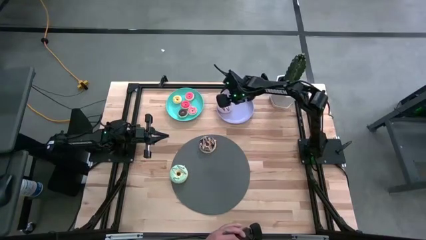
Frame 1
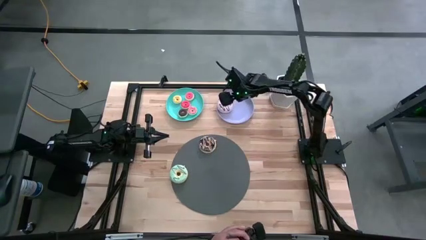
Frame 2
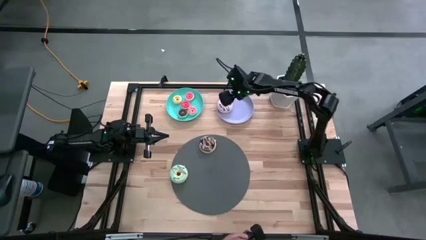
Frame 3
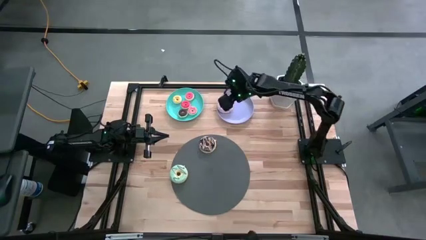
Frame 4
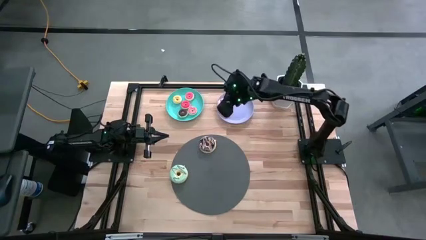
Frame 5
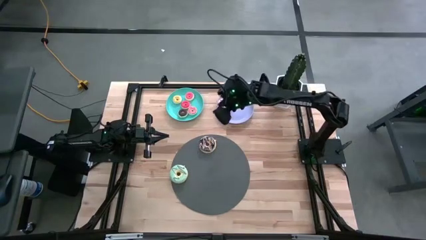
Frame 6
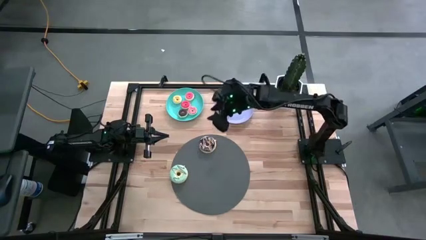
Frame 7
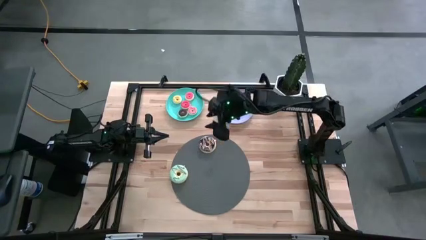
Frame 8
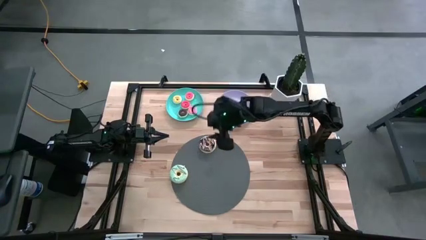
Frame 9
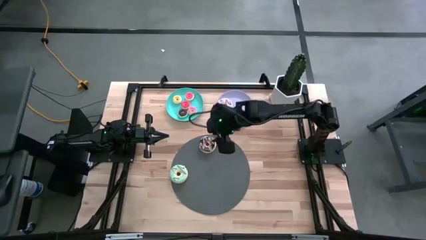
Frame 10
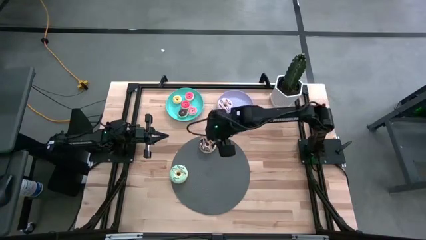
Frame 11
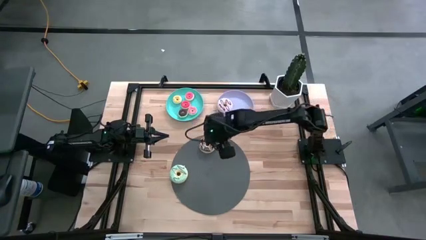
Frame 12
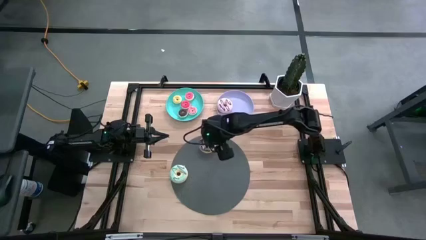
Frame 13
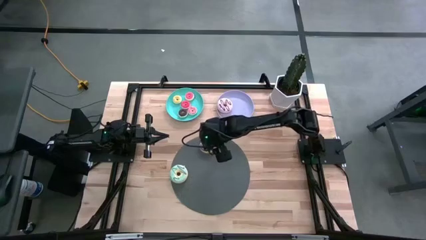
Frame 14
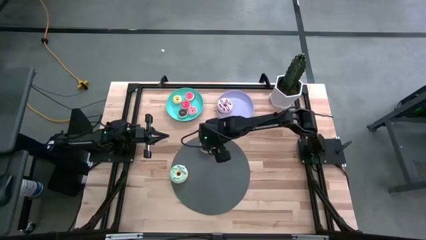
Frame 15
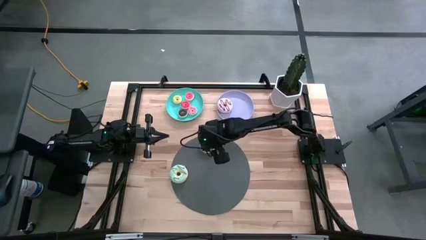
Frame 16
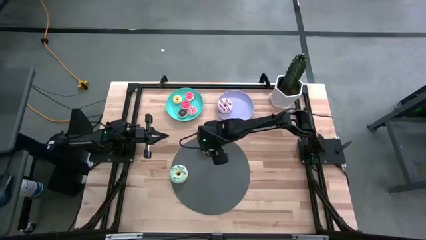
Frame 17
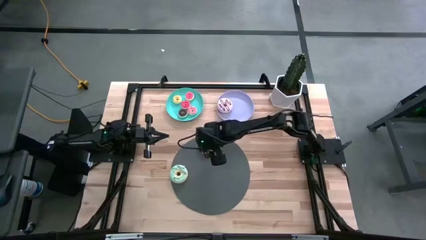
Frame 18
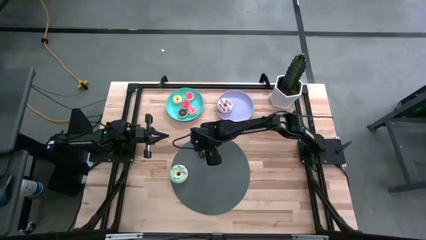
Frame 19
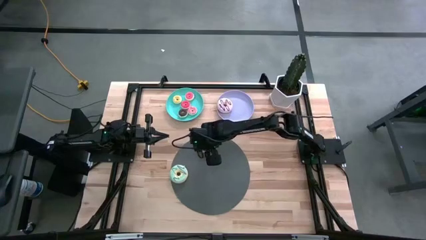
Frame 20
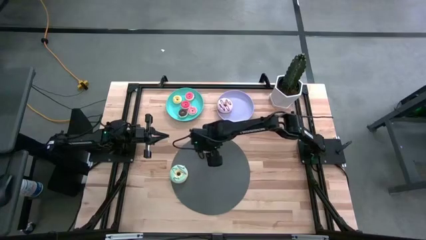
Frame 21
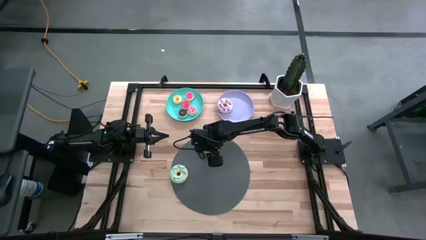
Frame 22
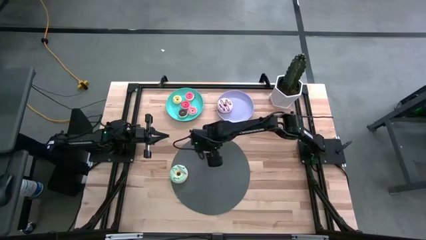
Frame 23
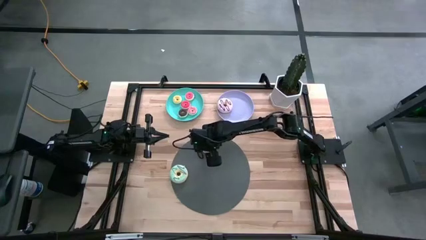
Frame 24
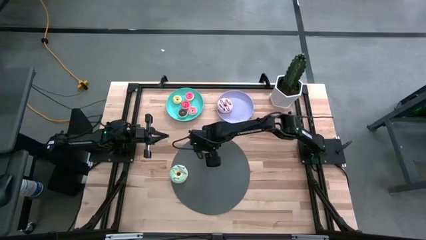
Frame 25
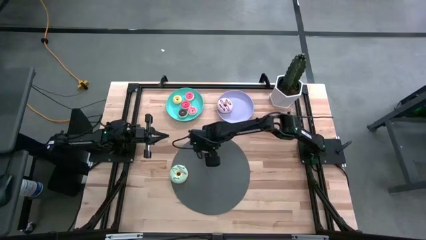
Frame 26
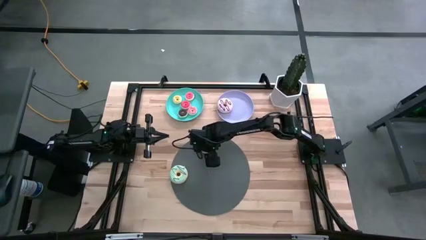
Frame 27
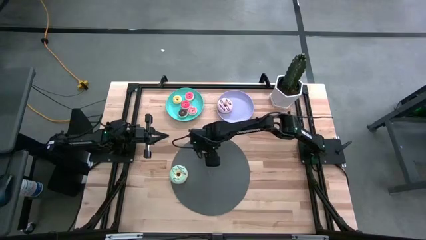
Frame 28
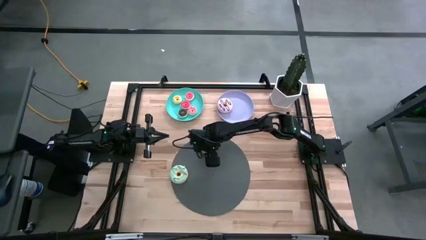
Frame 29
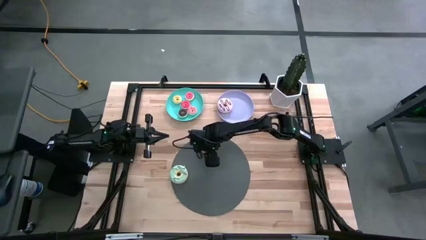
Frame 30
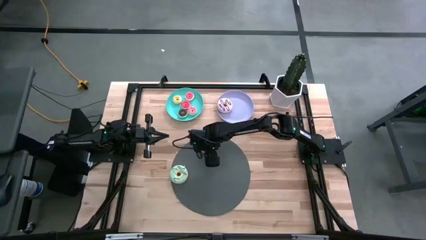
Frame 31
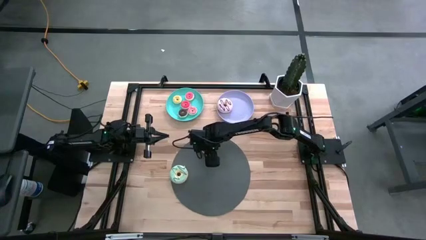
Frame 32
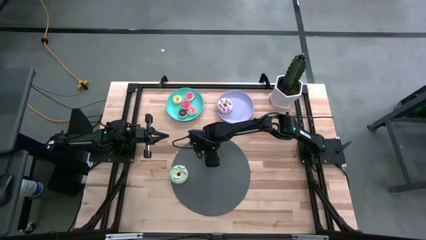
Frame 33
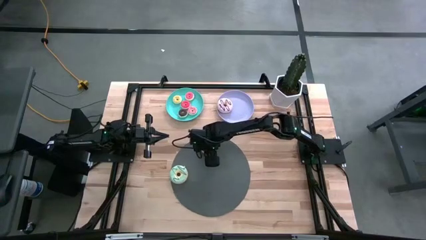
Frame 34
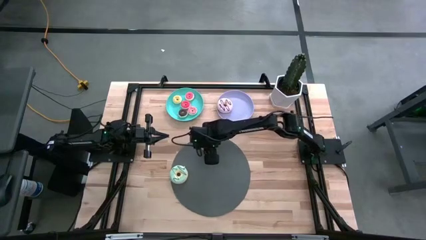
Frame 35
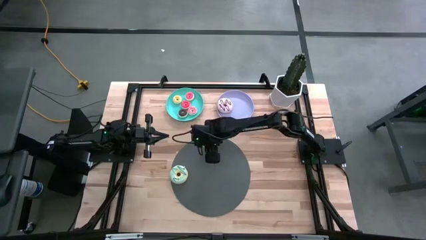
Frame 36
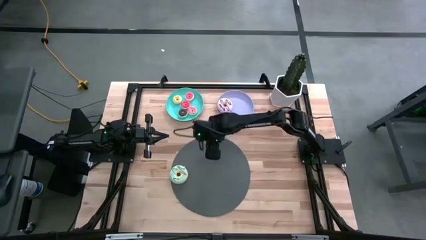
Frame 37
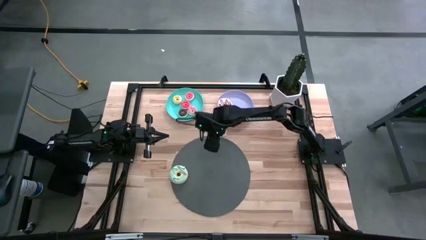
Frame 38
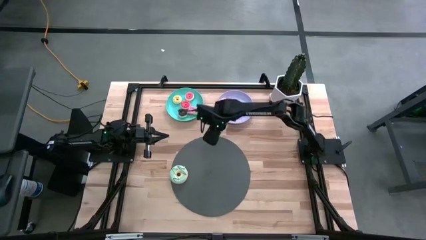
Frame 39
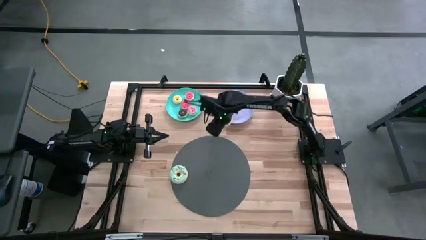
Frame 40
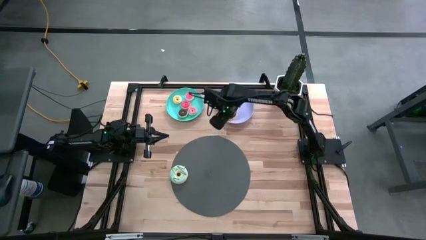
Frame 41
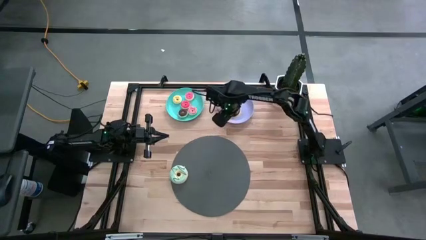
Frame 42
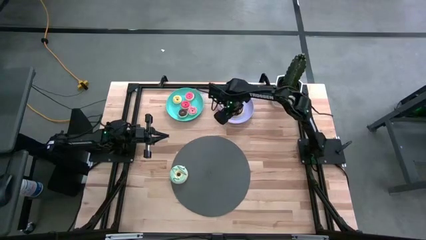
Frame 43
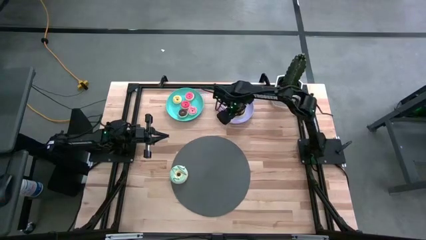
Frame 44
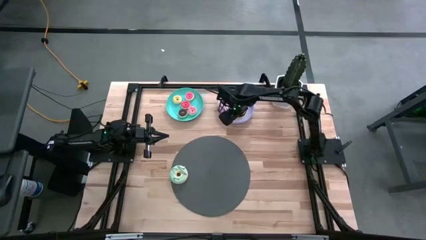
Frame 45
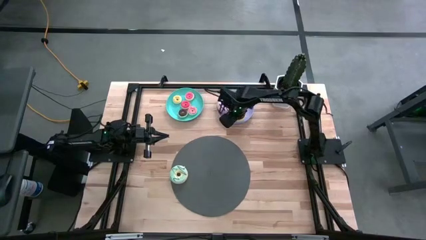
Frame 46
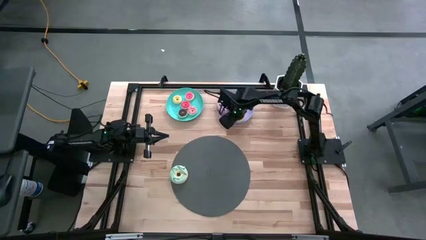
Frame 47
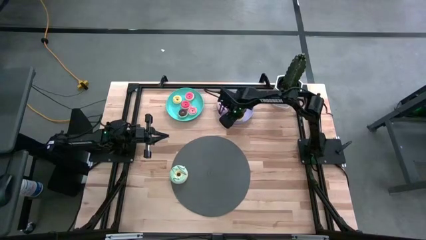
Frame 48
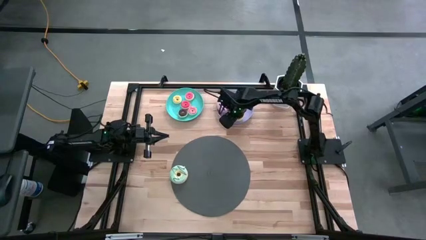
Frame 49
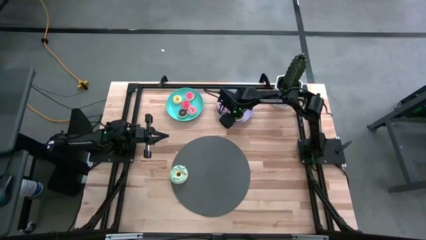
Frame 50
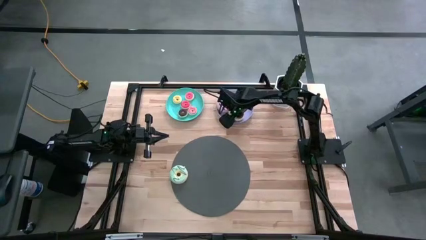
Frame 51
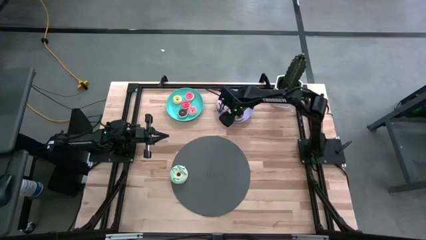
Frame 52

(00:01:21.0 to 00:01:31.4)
Task: Pick & Place donuts
Put the large black donut on the purple plate

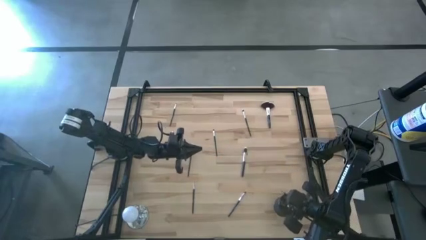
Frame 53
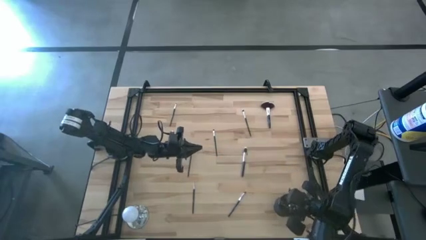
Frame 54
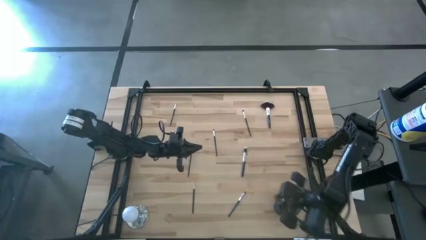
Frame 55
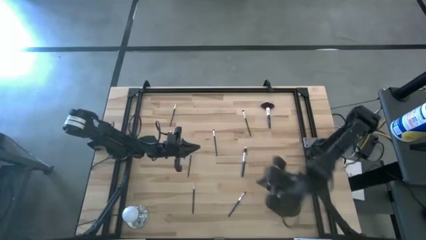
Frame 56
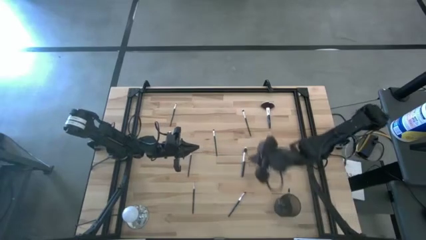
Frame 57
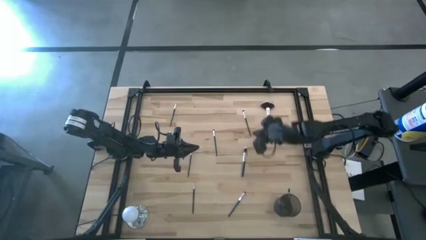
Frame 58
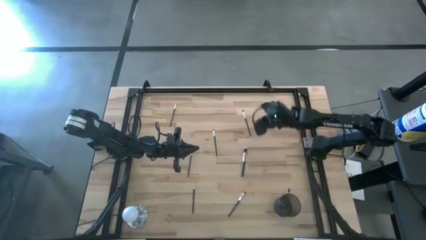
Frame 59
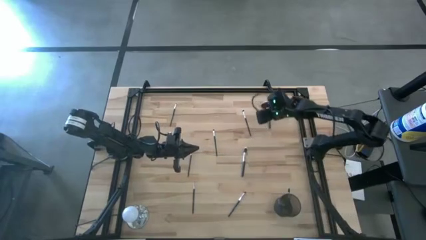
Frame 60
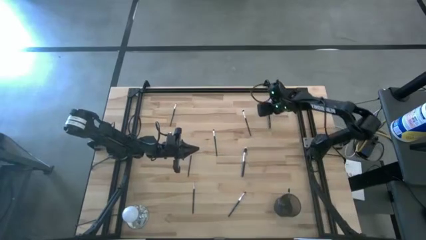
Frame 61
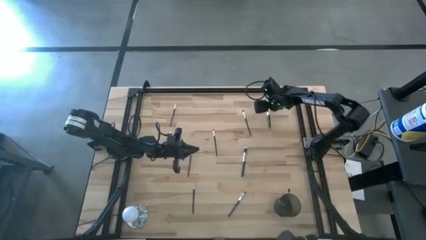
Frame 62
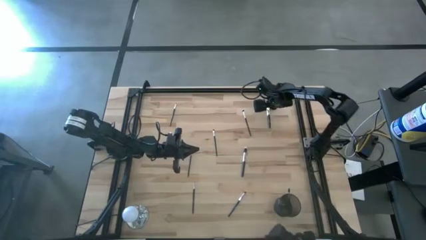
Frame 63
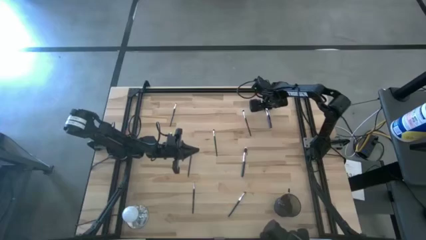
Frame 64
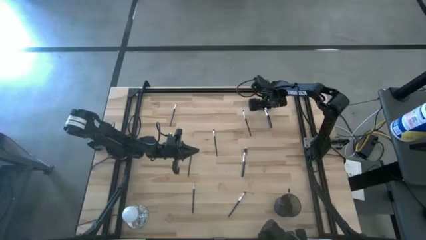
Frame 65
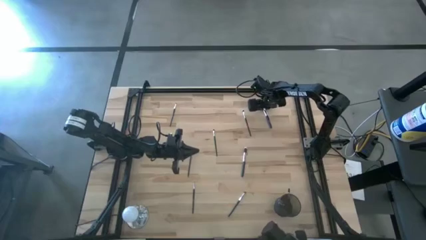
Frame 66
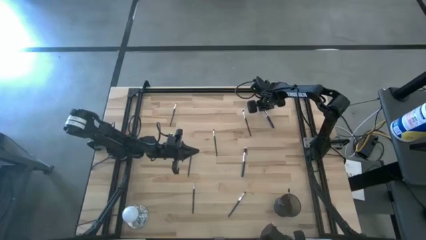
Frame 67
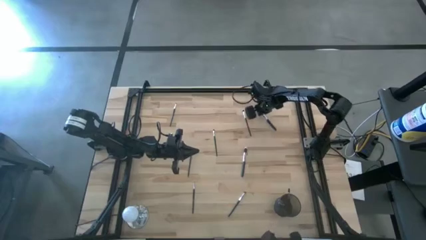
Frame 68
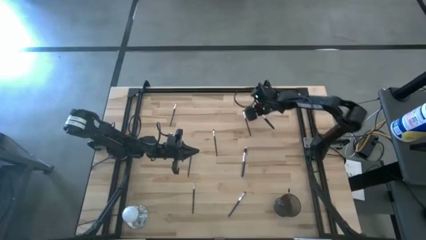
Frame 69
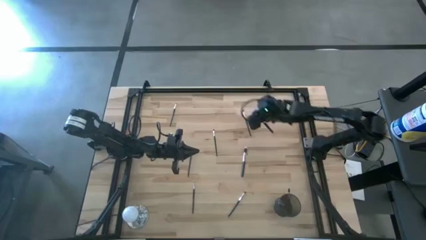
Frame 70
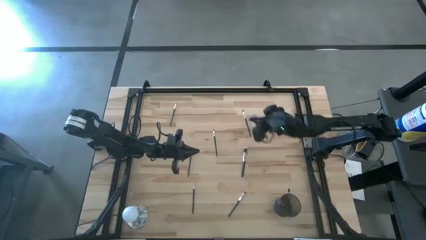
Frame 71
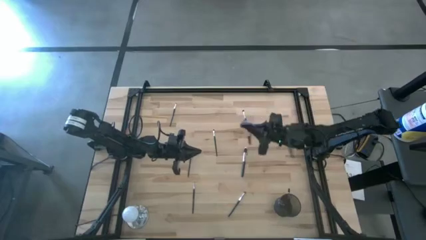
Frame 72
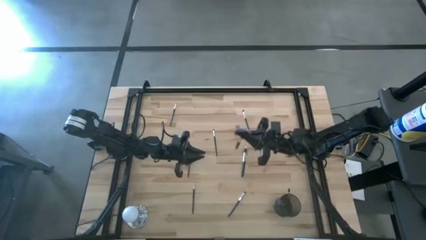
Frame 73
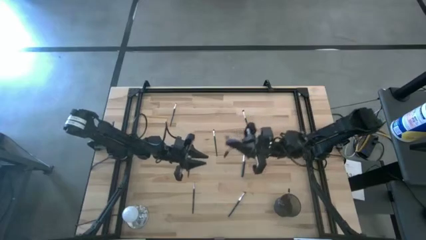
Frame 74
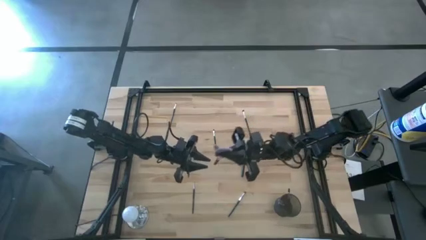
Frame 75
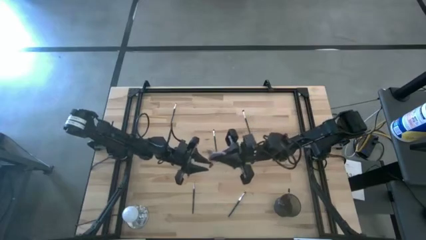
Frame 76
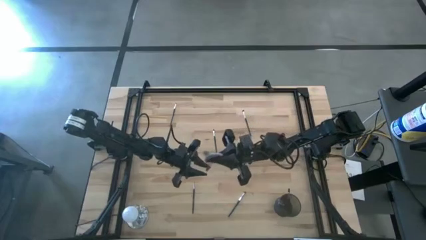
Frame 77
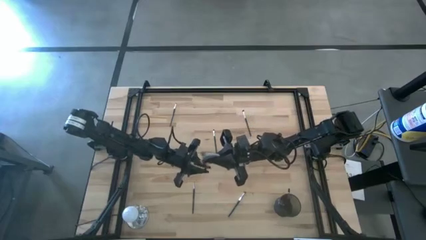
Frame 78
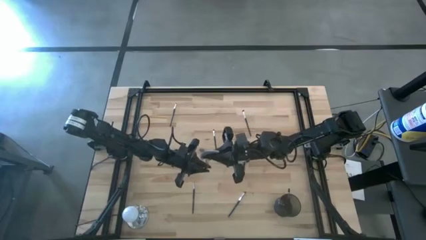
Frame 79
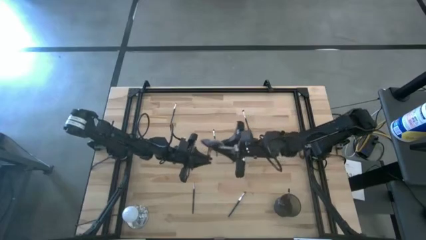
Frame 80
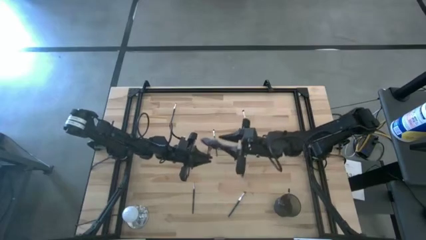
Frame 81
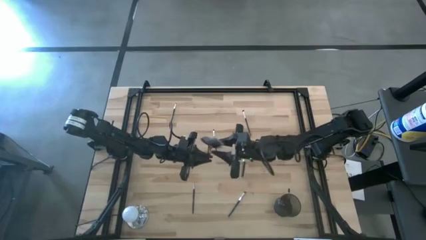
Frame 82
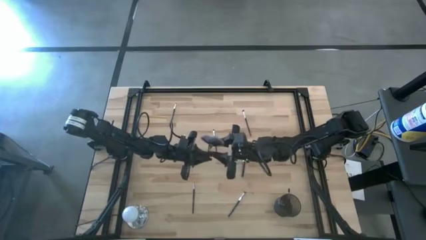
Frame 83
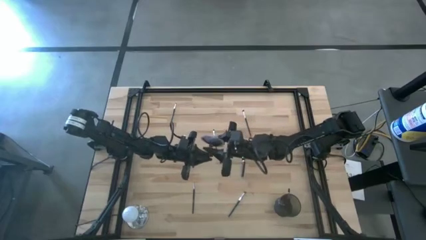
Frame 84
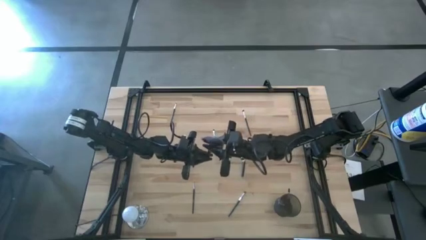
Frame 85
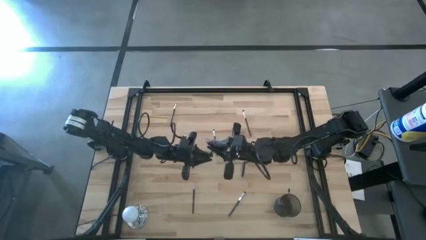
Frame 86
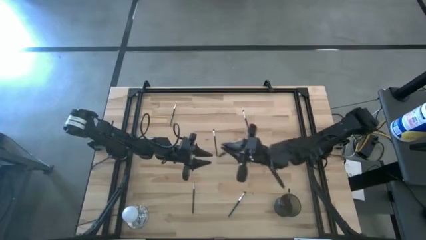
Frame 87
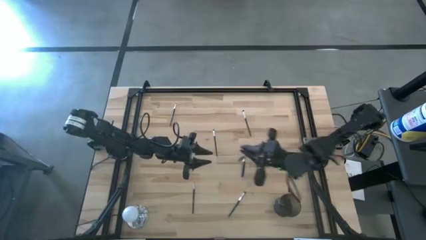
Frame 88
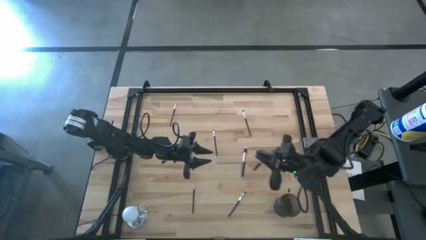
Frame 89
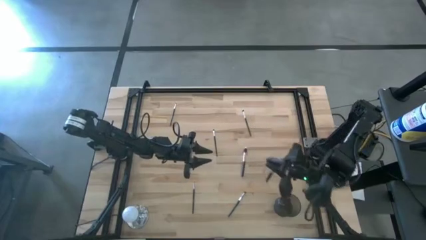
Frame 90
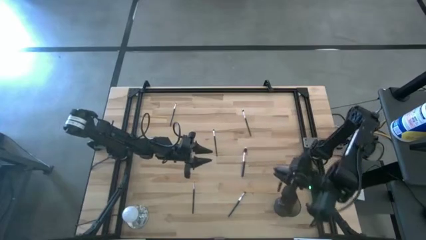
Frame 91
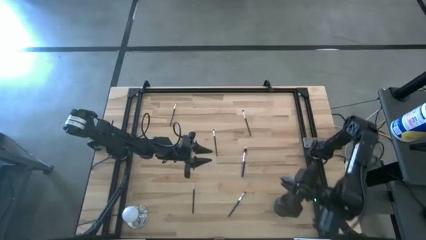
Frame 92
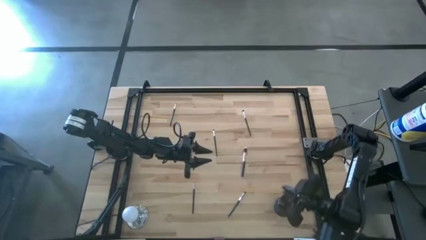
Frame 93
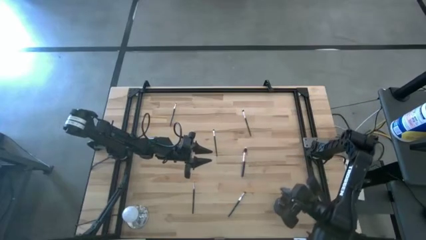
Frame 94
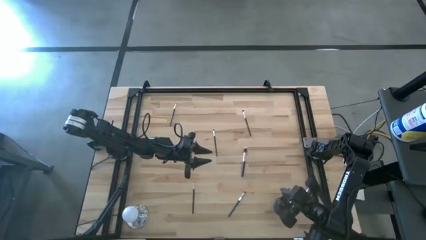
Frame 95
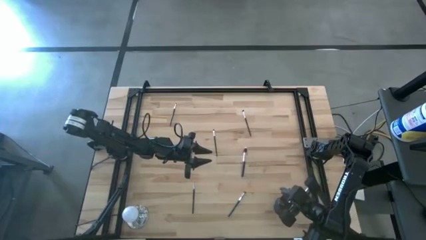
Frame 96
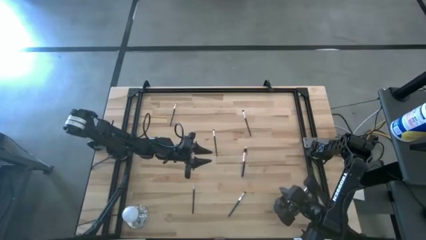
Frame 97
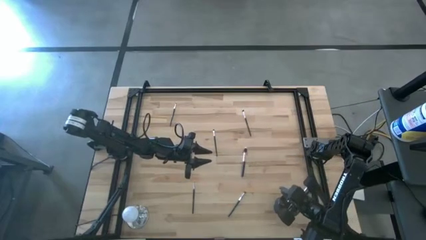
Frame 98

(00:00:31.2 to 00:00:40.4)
Task: Sort items
Put the highlighter brush into the wire basket
